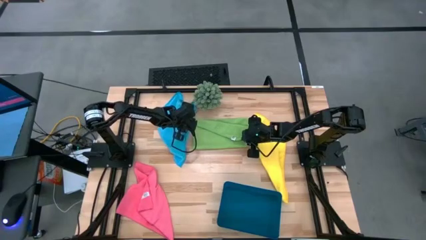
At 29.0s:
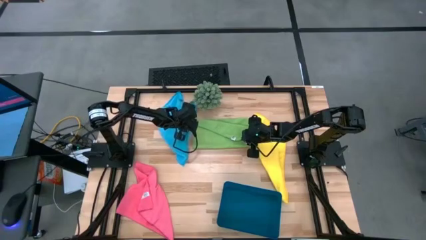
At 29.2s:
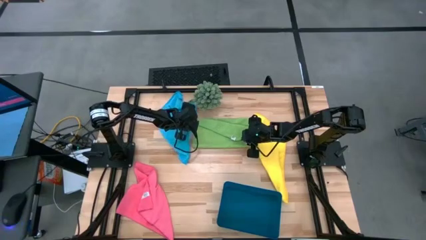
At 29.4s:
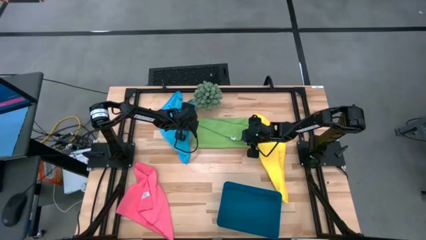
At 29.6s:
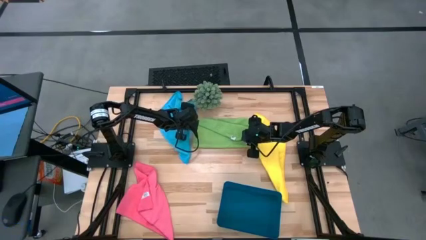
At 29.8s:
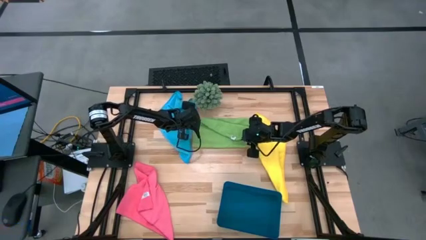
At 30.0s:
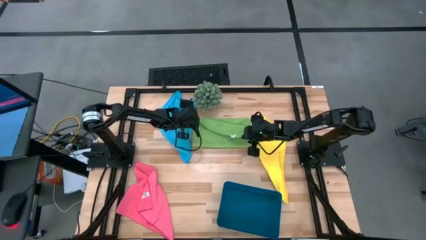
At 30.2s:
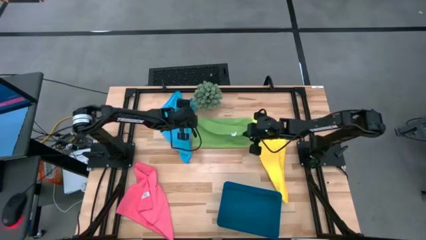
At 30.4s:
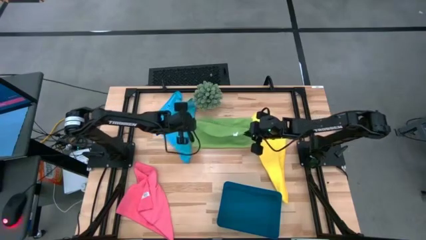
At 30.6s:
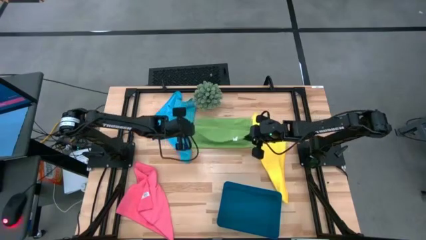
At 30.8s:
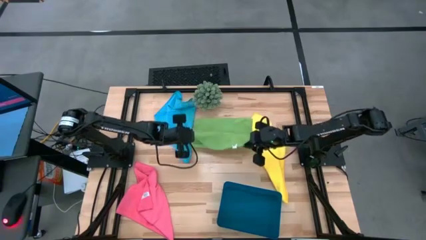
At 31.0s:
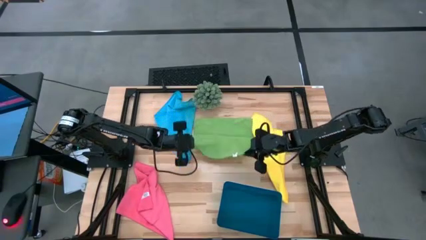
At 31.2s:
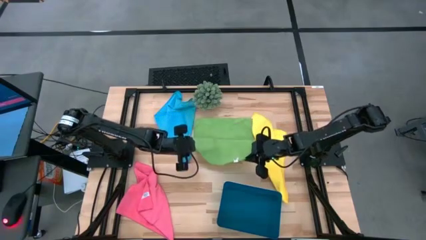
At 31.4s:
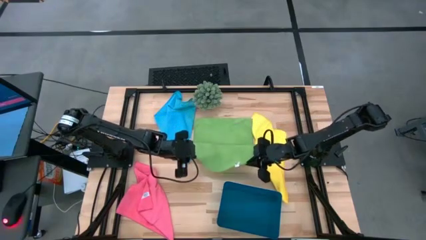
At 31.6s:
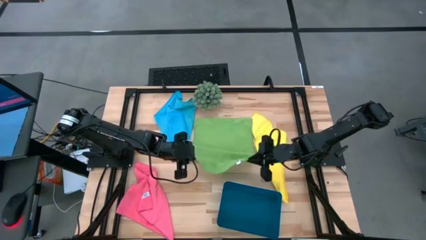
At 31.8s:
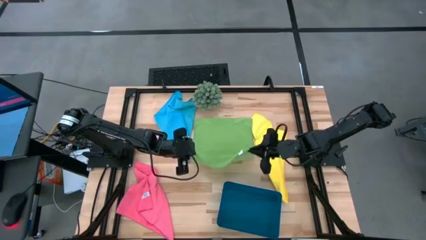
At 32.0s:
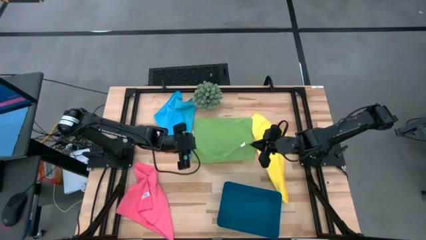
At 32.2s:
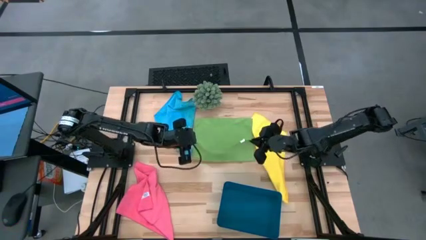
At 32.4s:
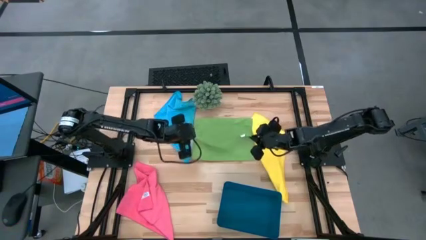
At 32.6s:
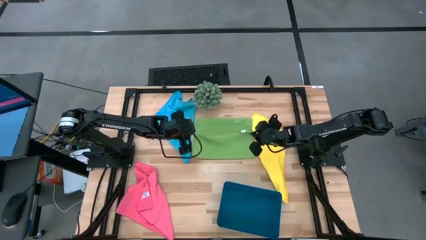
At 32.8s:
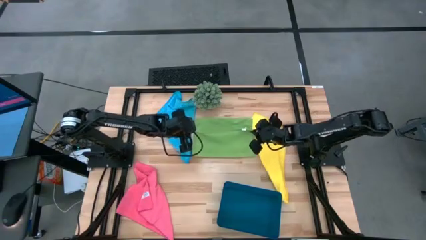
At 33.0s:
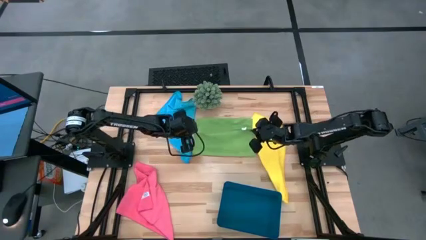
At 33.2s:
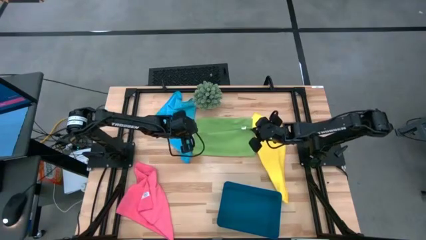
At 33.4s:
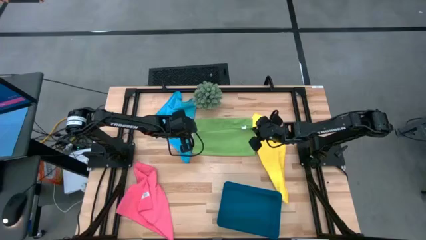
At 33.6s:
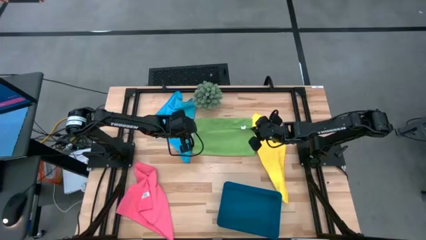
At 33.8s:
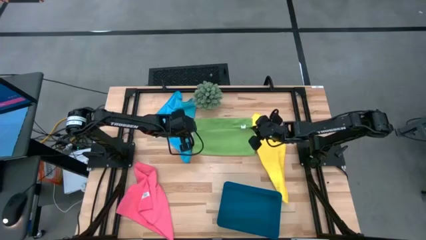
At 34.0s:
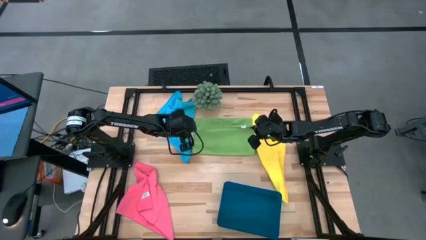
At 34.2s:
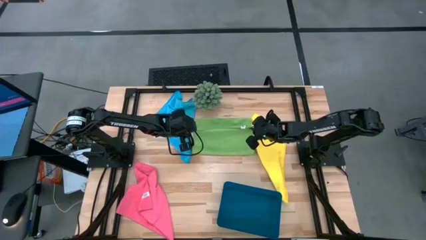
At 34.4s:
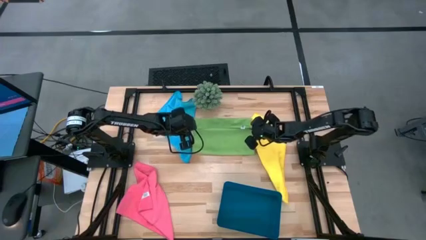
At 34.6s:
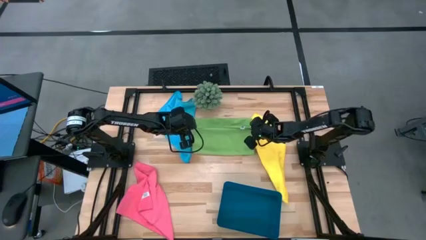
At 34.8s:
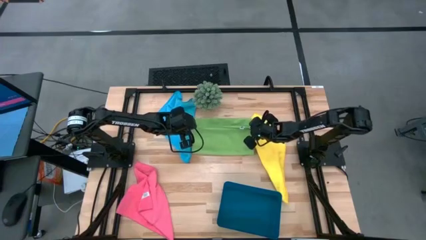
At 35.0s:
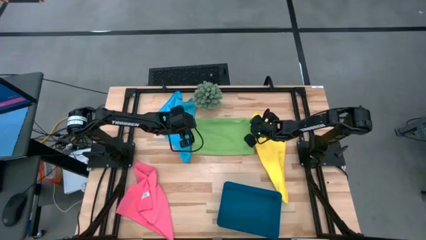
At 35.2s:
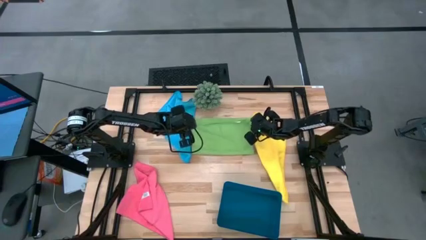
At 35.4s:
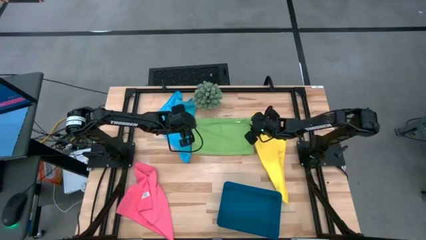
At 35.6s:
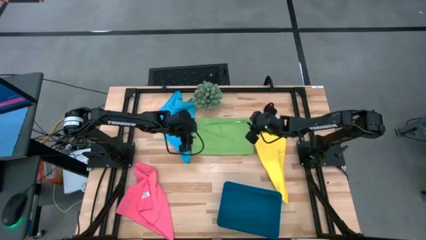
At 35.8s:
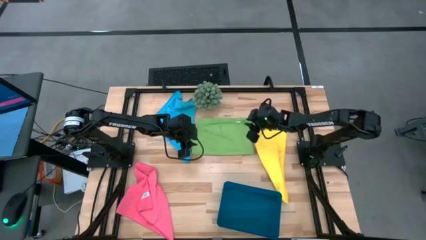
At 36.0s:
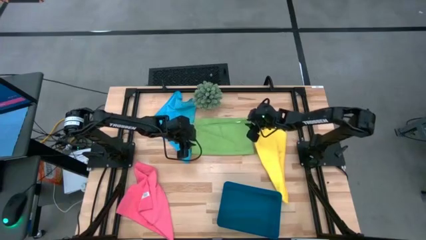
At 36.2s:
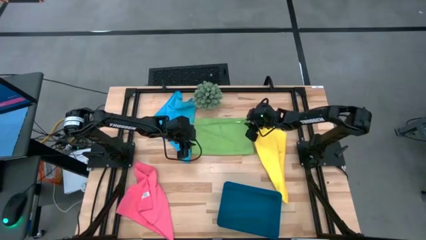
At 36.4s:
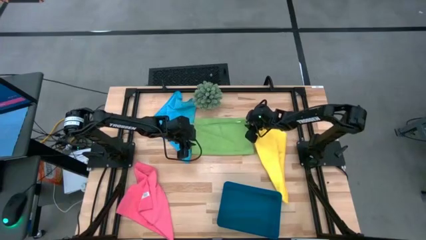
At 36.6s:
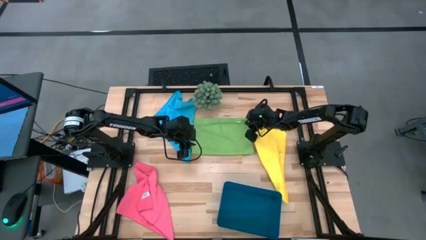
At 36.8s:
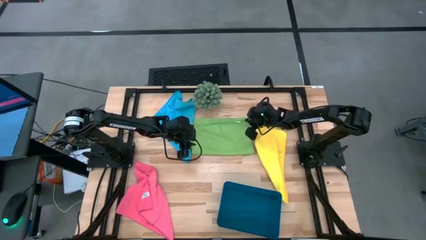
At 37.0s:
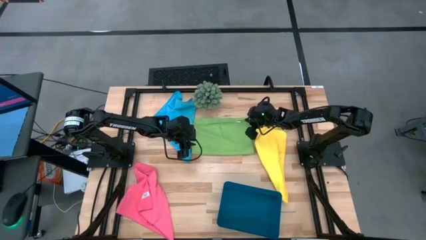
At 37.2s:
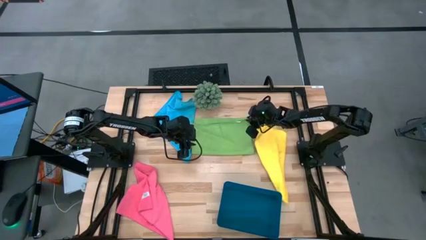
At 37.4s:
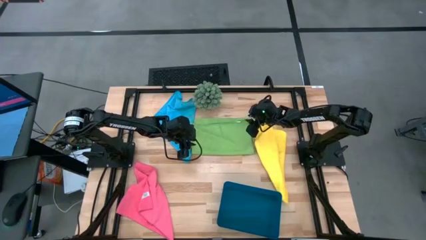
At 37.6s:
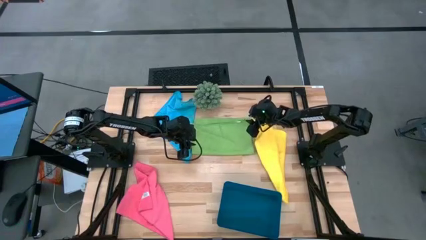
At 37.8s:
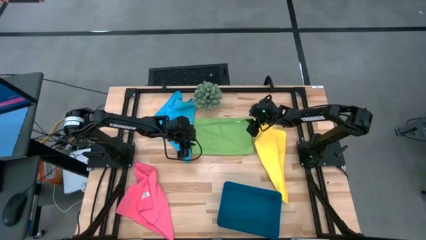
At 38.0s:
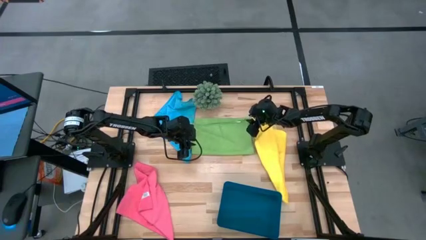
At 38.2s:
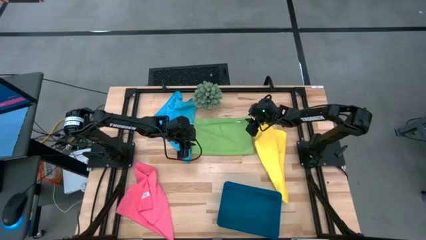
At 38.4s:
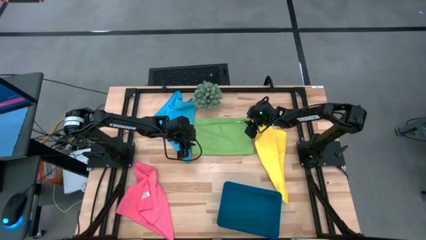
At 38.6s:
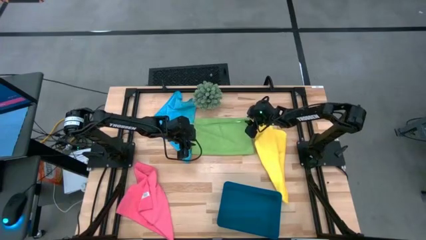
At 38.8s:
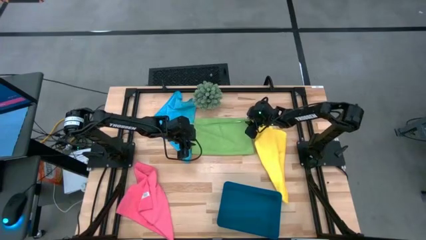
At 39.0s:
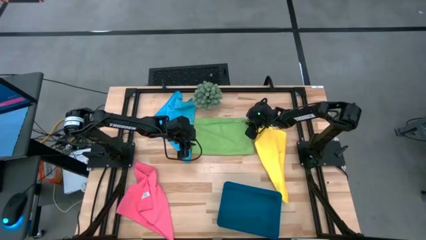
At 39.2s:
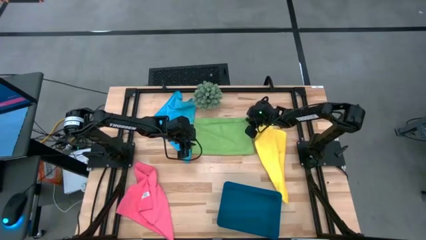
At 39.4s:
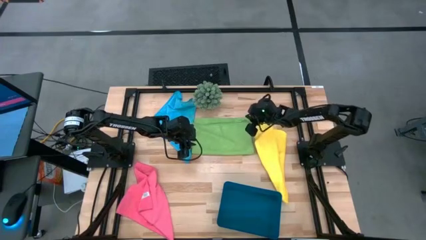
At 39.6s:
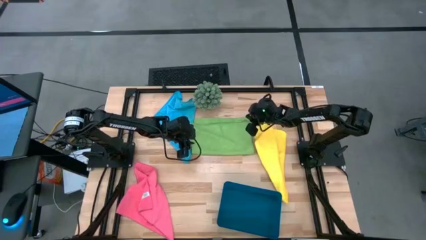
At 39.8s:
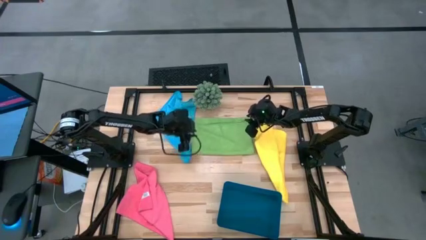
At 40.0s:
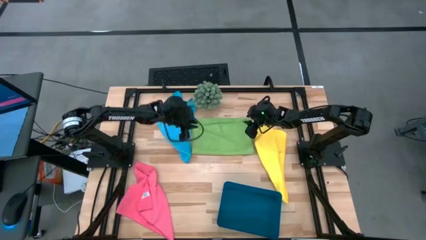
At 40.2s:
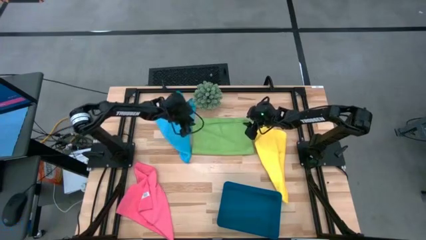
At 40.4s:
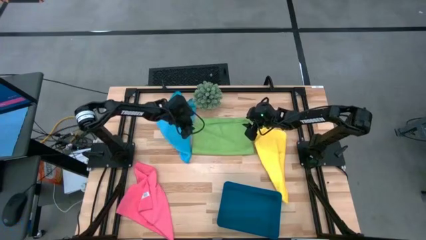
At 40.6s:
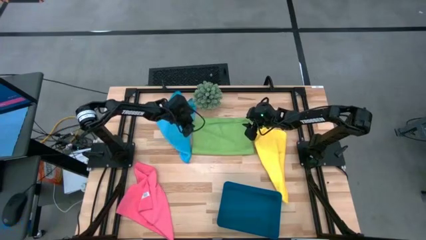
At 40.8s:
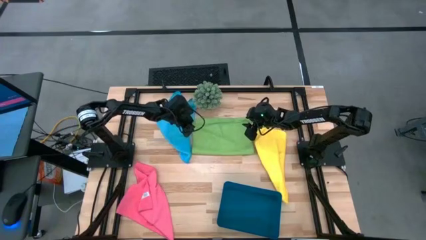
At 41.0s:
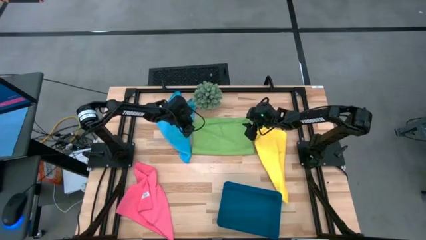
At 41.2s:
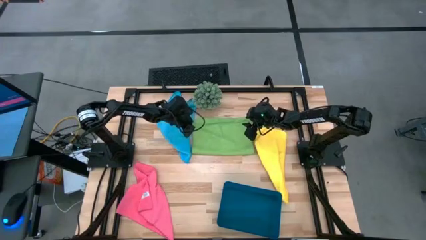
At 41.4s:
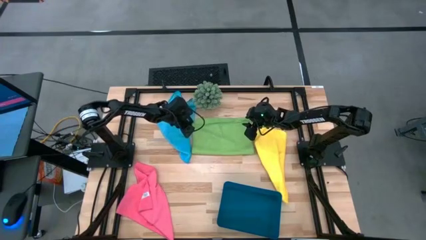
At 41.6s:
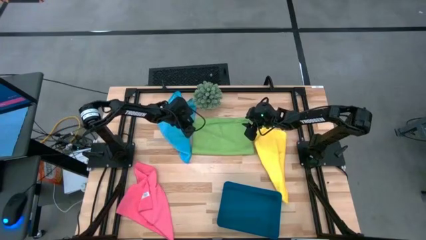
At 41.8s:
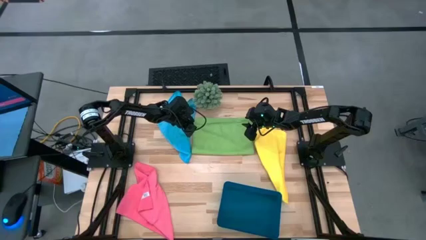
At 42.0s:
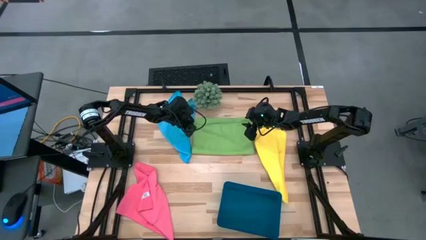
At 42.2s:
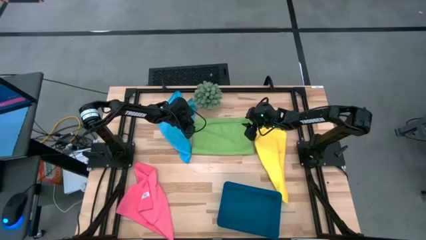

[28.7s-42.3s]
Task: Fold microfiber towels
Fold the green microfiber cloth
